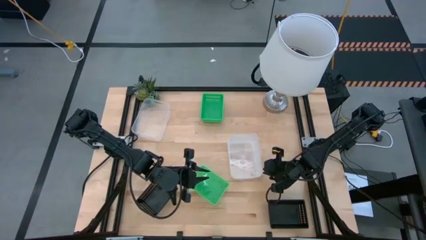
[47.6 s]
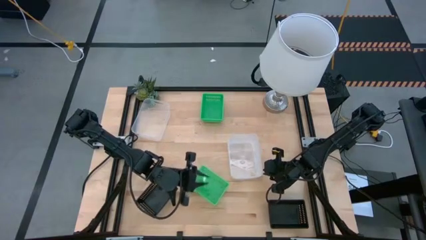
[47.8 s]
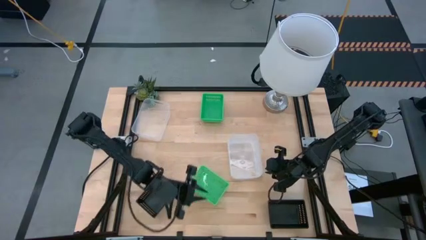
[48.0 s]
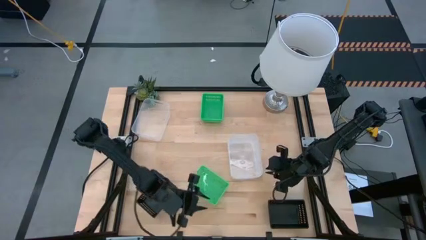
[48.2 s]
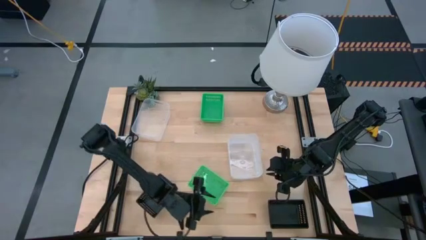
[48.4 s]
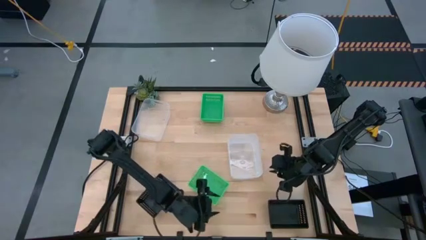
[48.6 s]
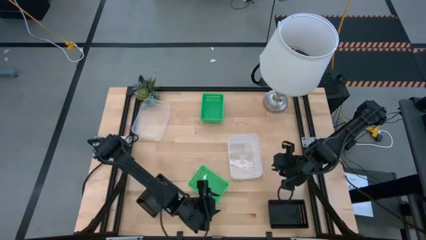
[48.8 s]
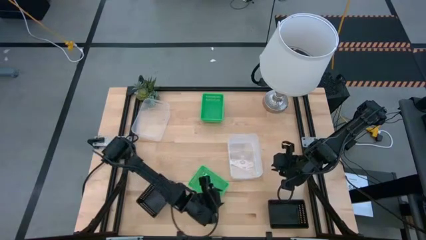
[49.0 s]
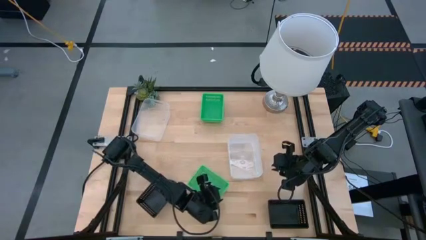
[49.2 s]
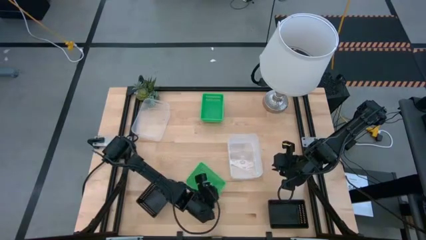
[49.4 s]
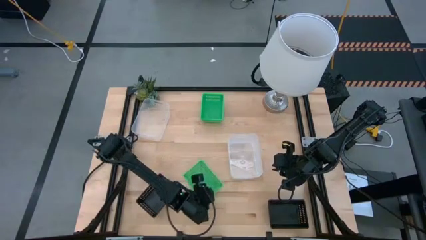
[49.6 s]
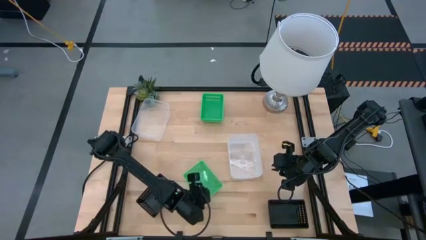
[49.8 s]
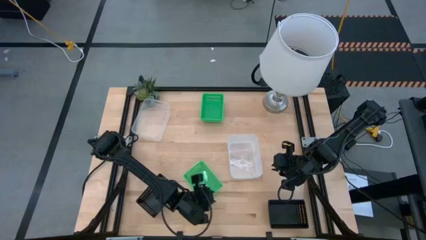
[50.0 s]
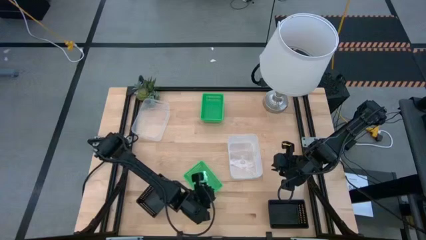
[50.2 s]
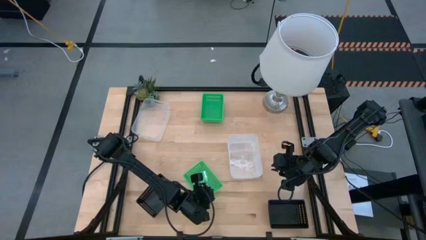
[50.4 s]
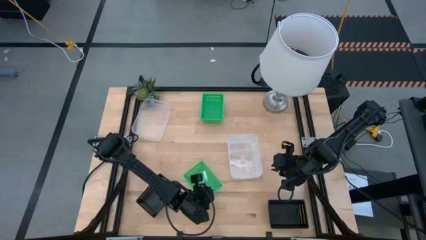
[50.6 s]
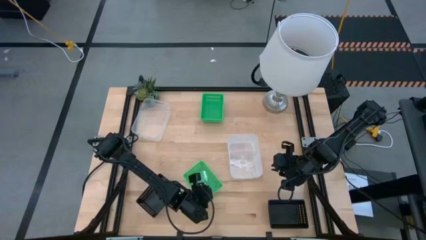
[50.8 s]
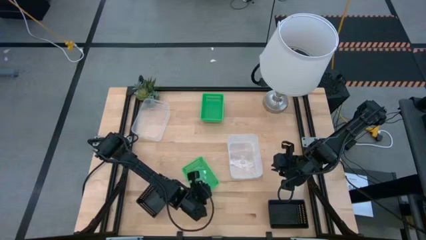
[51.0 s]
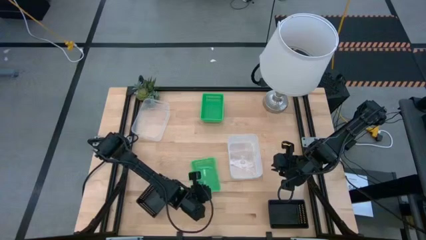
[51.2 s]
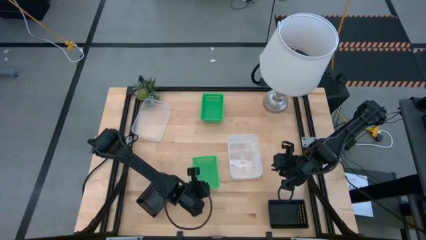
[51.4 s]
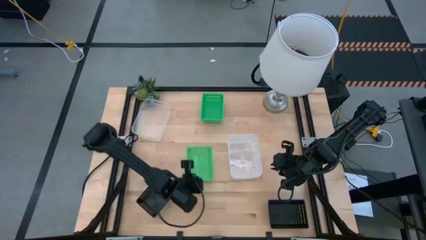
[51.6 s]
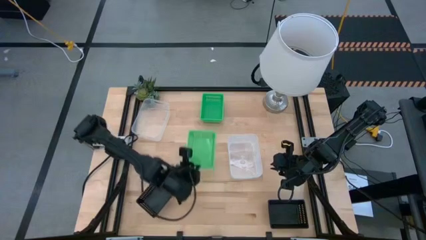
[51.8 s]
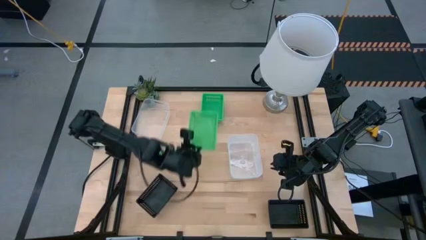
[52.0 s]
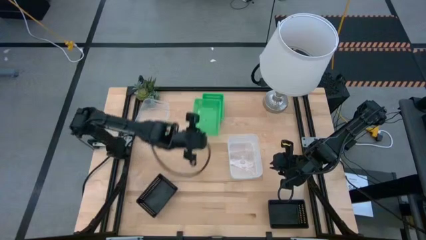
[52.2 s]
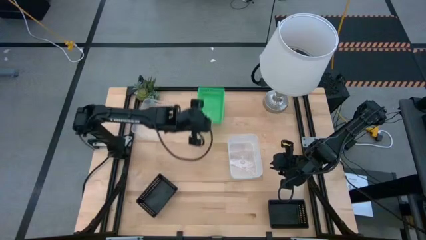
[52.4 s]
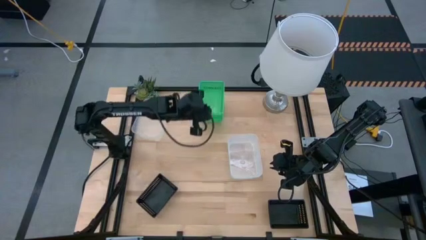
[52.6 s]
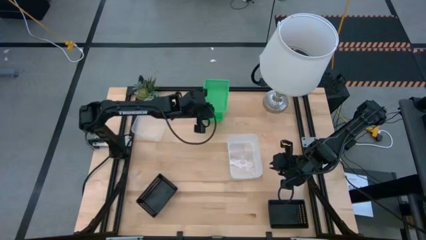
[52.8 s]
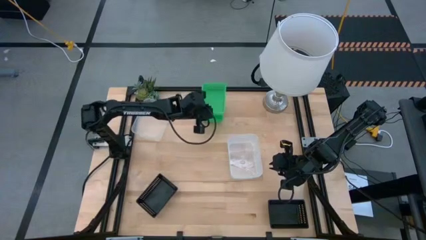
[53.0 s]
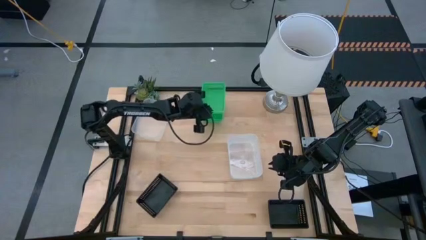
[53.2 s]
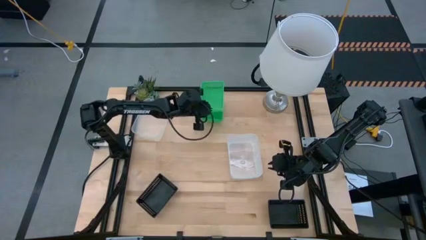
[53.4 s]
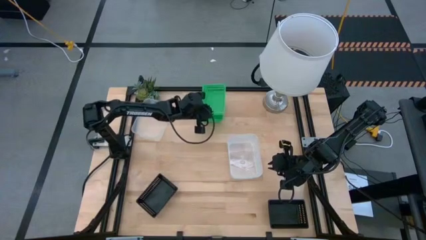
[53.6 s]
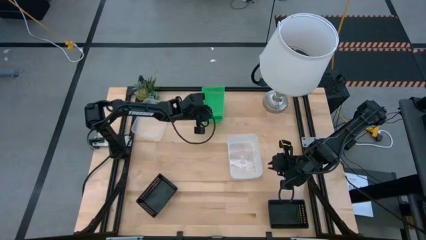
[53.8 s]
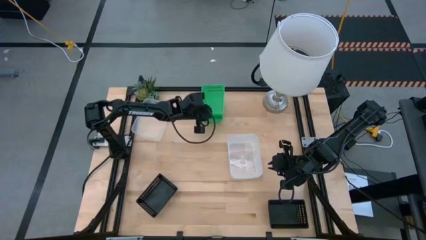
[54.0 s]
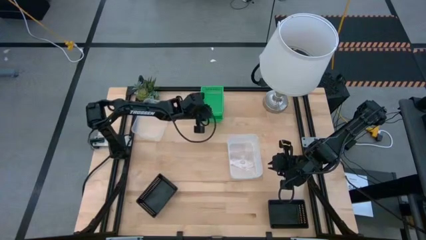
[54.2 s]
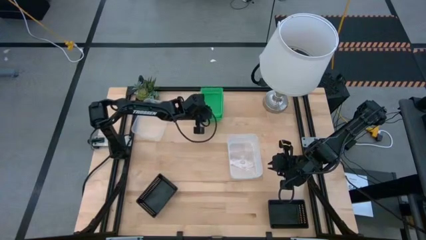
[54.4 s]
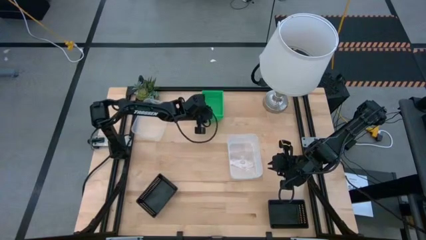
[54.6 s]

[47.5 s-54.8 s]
Stack the bottom green bin on top of the top green bins

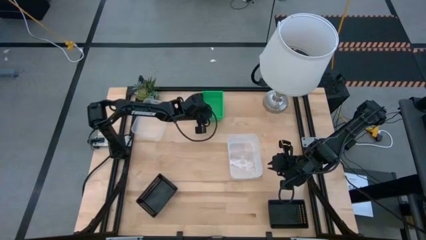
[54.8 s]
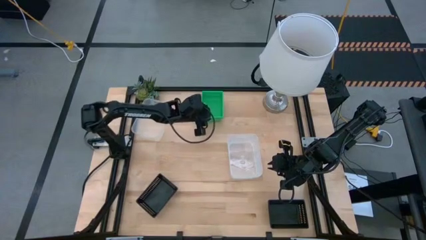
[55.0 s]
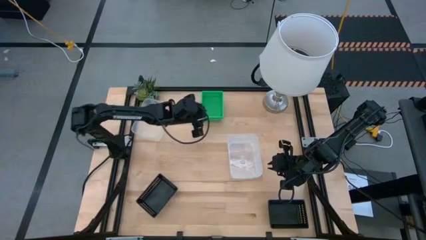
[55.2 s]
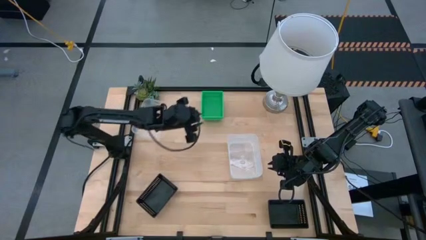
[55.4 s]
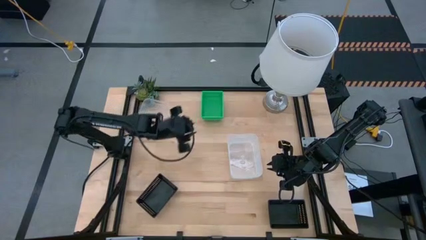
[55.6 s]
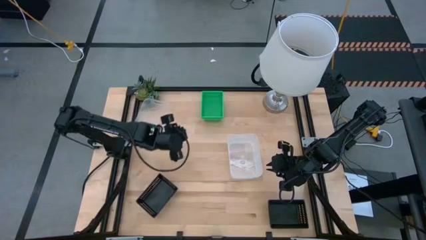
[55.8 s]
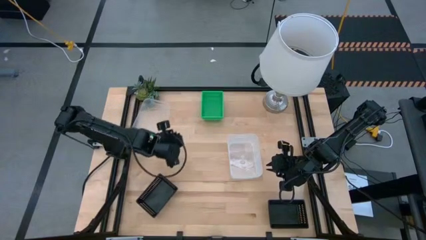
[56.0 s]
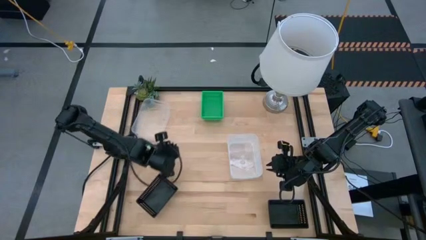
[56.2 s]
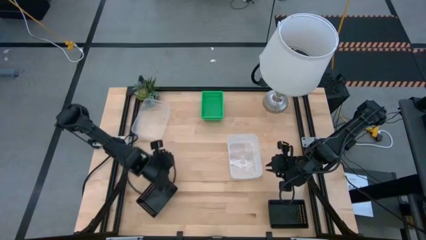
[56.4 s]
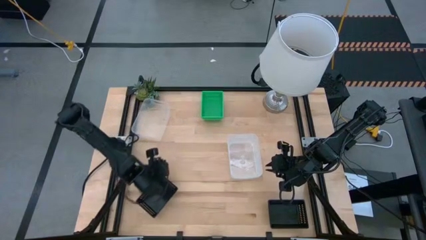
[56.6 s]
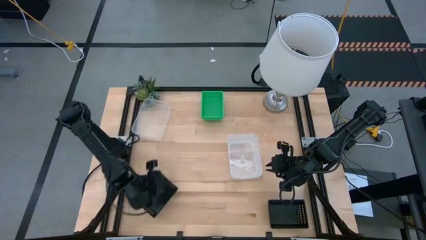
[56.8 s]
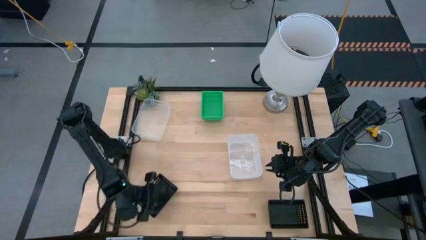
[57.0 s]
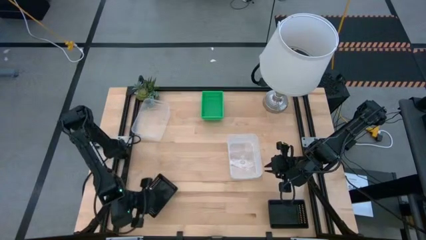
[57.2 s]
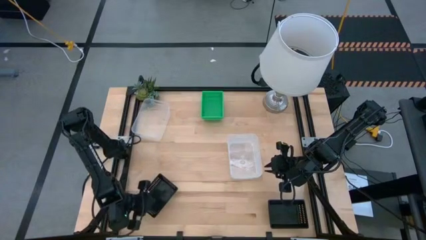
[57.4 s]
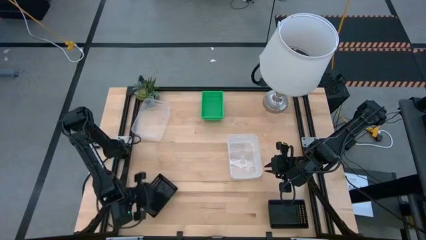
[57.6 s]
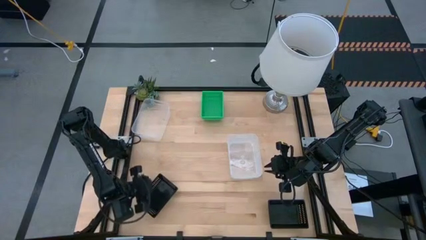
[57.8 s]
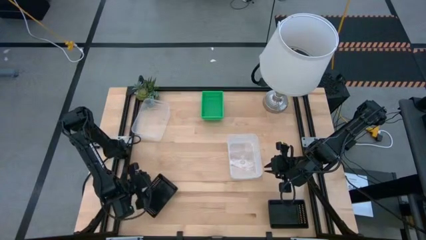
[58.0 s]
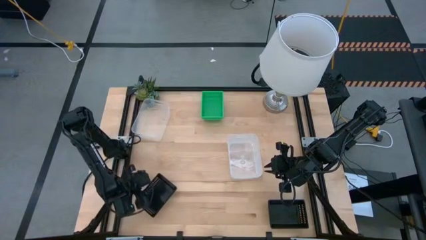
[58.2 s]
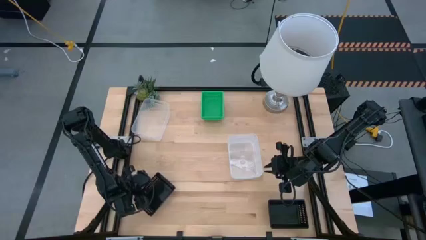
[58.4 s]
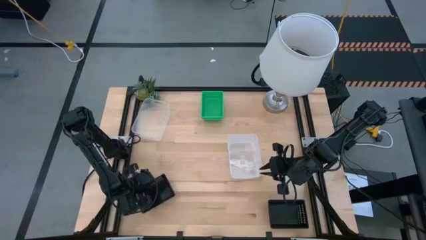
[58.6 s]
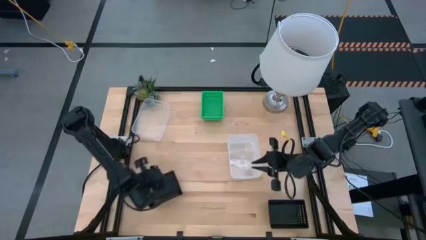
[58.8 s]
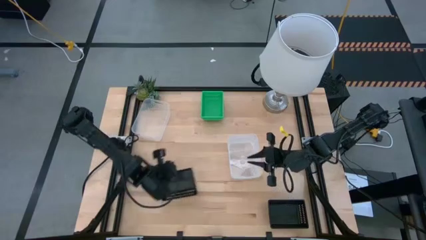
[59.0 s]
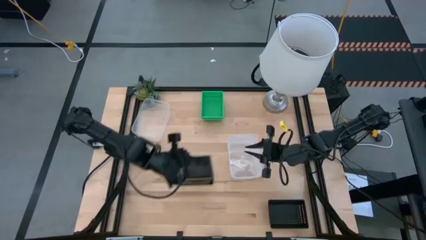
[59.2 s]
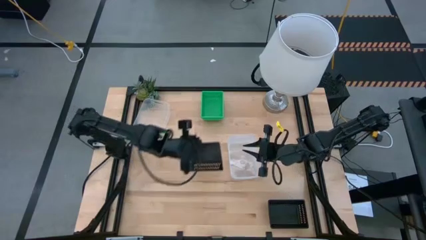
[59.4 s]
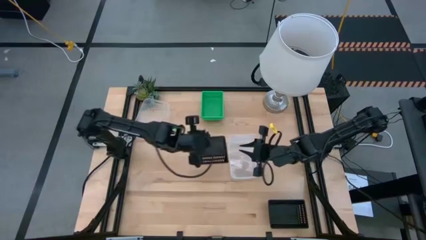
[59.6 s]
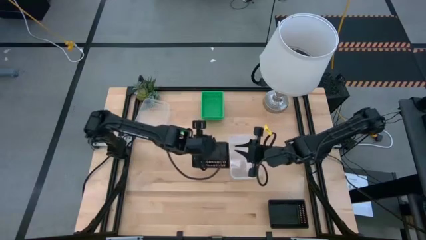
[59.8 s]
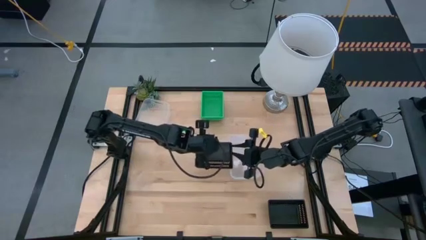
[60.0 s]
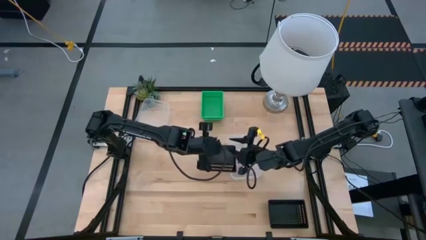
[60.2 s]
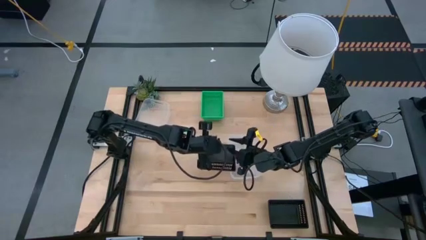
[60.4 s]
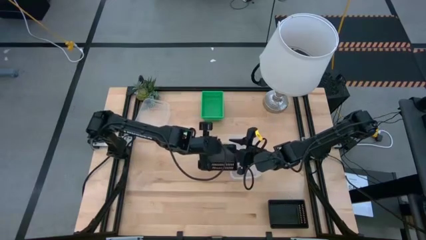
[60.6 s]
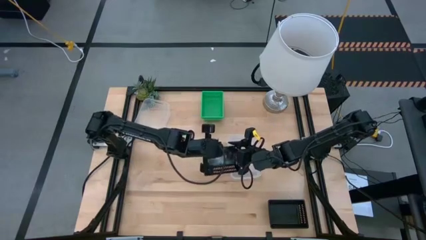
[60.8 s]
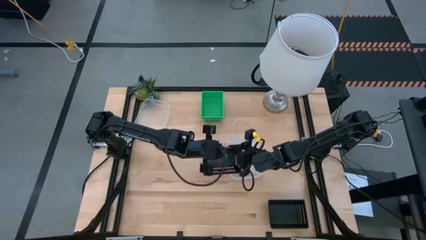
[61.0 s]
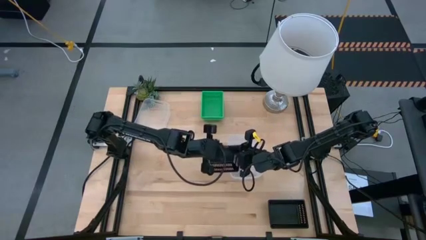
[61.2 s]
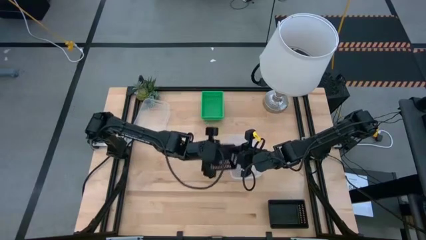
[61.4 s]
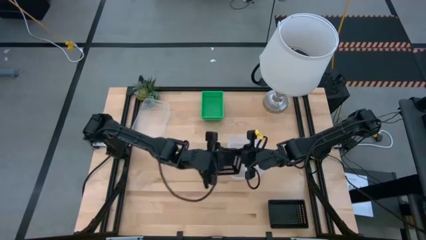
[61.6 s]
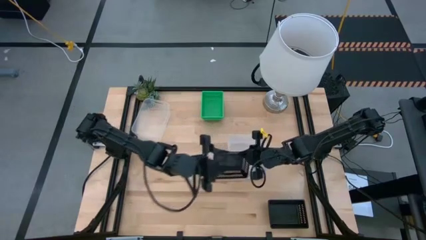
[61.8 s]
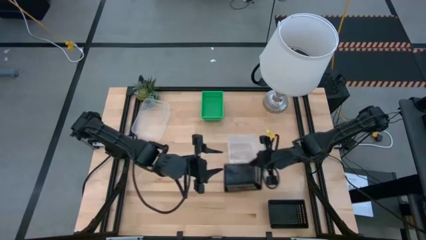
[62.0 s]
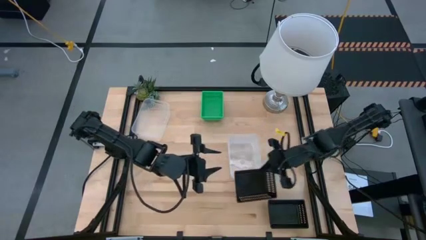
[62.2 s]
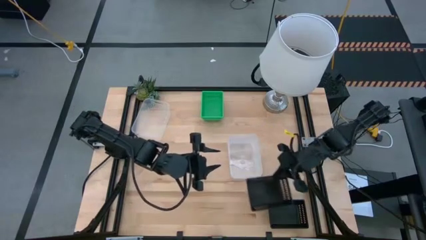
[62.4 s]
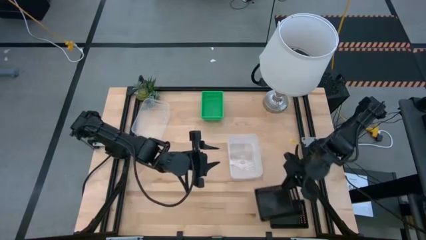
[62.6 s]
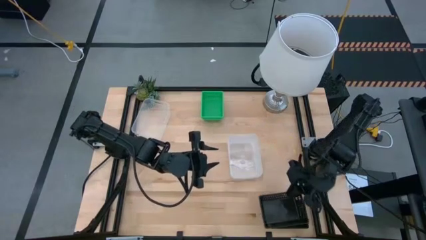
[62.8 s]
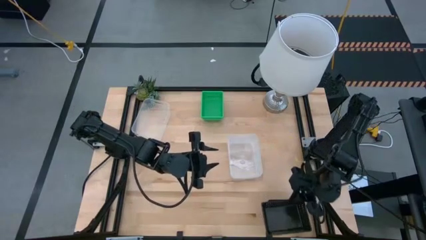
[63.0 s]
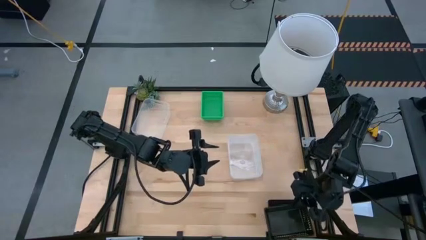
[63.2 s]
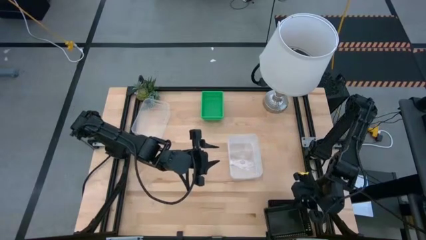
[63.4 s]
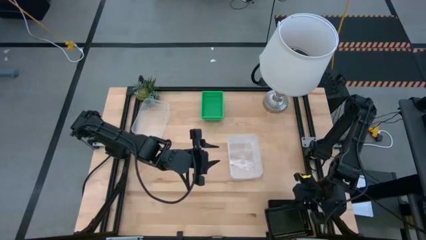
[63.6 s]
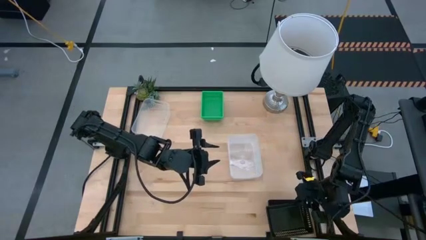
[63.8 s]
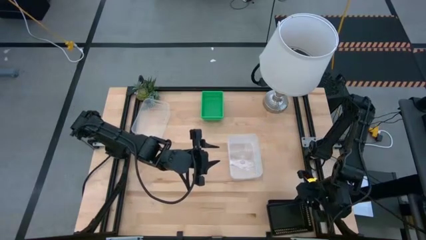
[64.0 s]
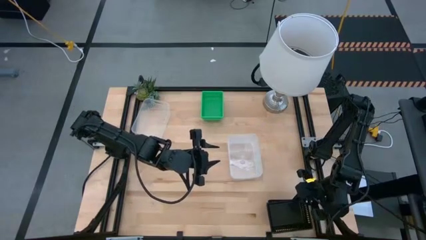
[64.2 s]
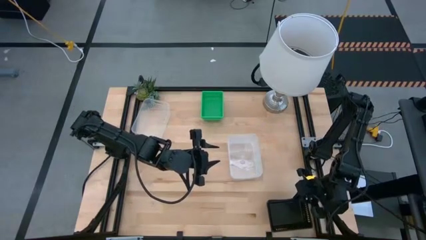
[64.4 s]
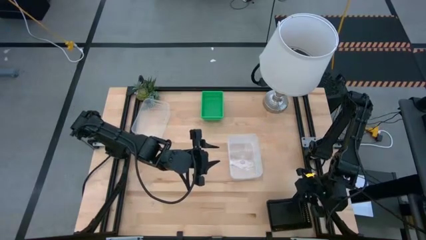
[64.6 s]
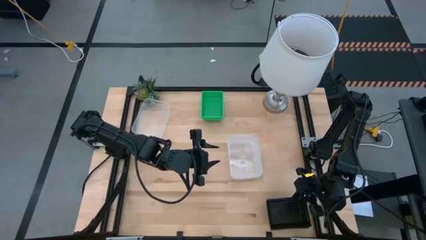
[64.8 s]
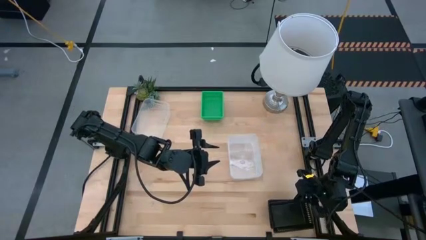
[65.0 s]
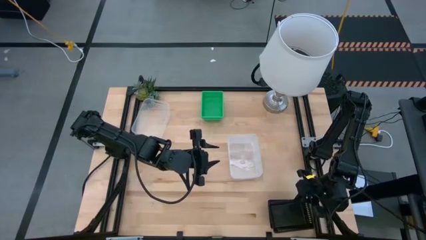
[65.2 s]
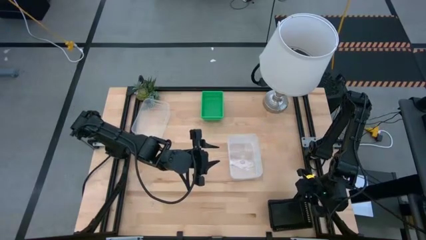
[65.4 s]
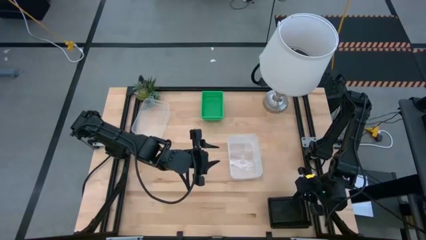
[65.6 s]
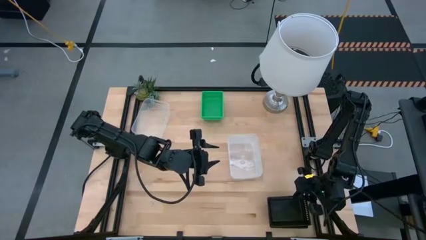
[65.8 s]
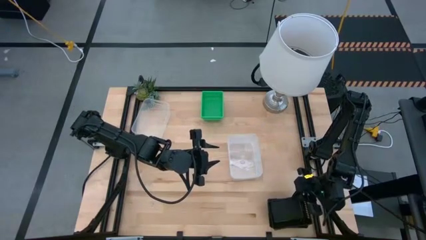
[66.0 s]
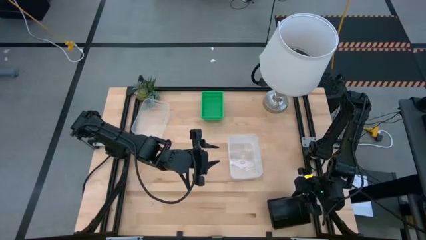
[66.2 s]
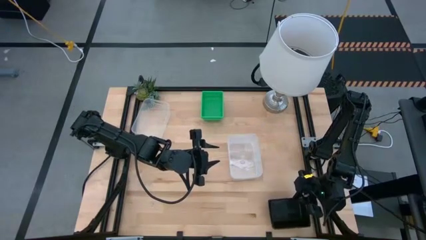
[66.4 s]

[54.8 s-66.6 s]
Stack the left black bin on top of the right black bins
